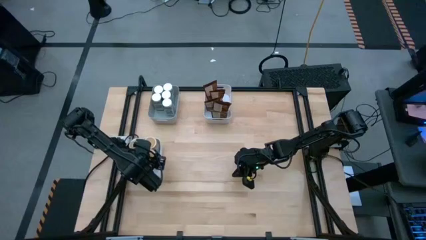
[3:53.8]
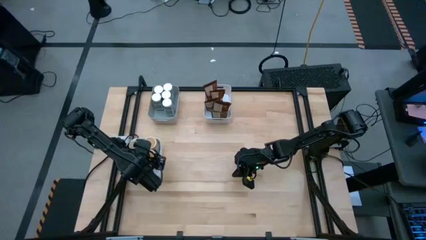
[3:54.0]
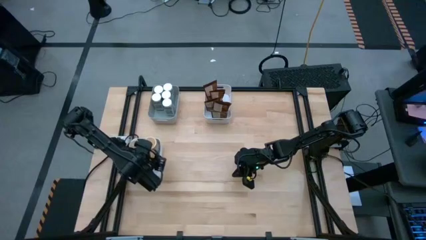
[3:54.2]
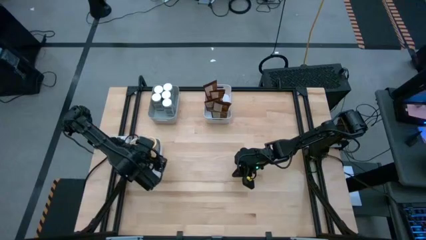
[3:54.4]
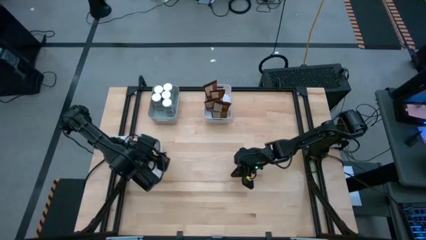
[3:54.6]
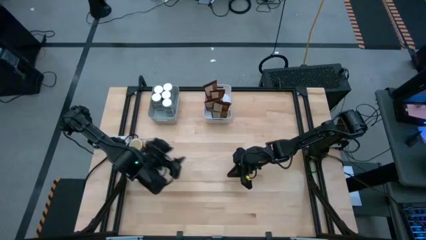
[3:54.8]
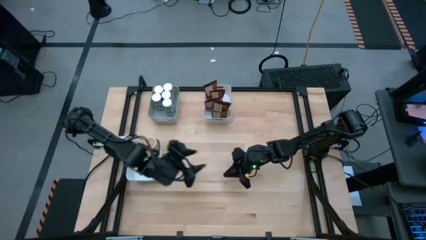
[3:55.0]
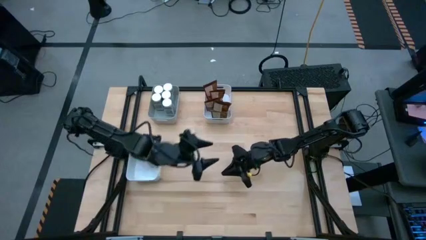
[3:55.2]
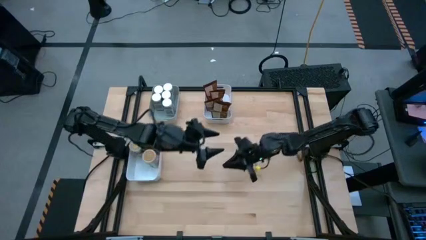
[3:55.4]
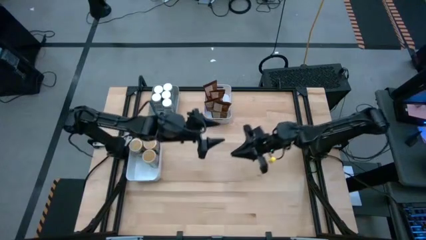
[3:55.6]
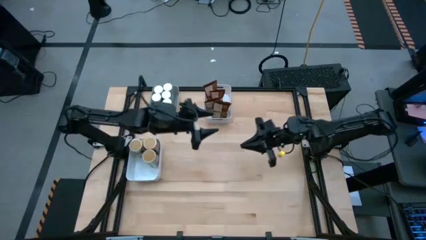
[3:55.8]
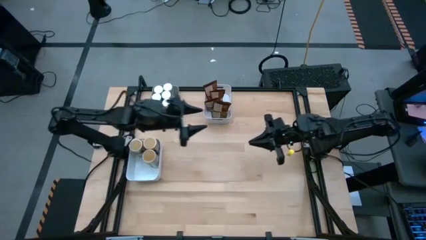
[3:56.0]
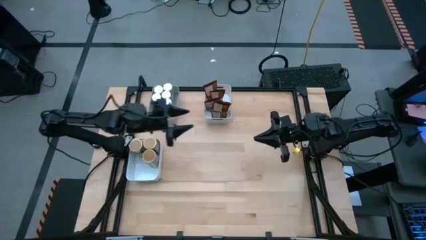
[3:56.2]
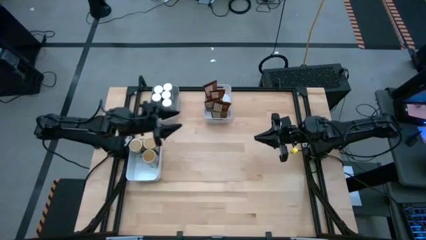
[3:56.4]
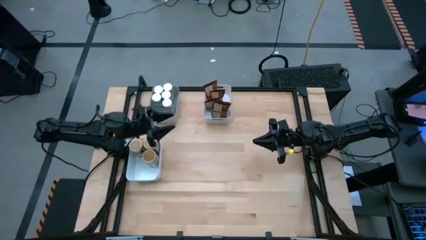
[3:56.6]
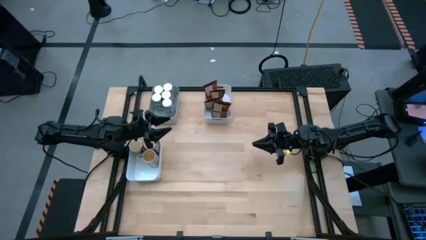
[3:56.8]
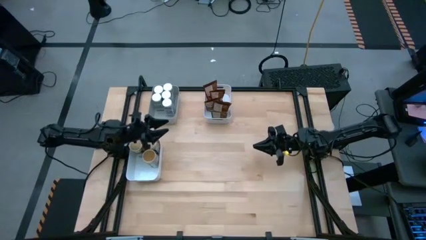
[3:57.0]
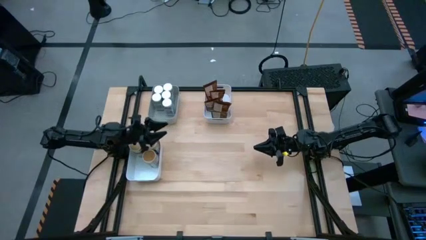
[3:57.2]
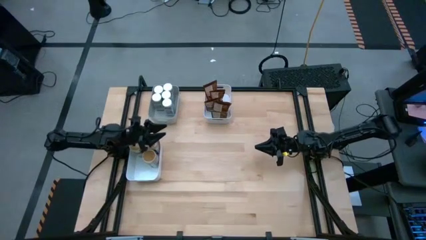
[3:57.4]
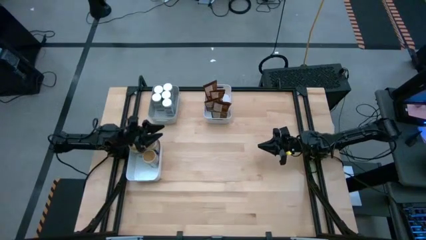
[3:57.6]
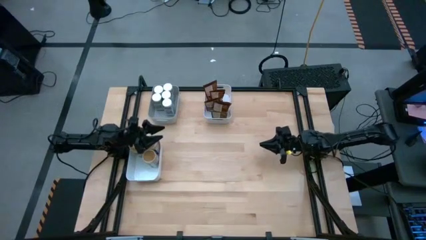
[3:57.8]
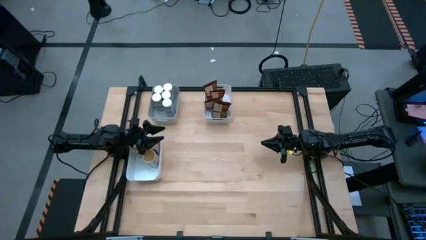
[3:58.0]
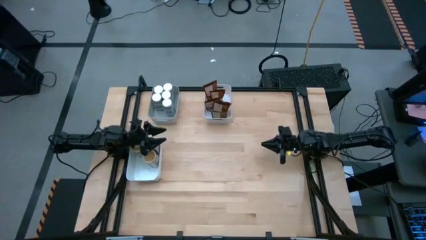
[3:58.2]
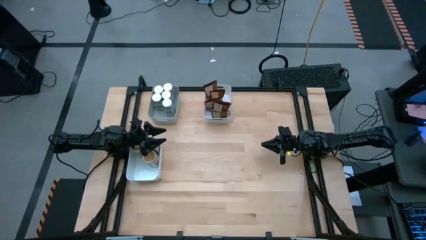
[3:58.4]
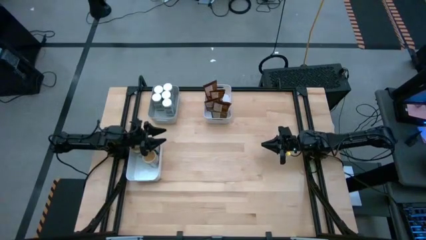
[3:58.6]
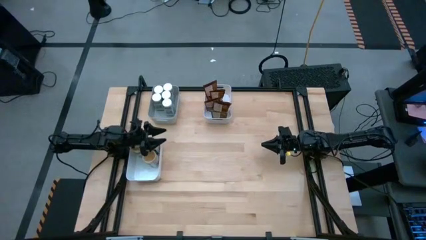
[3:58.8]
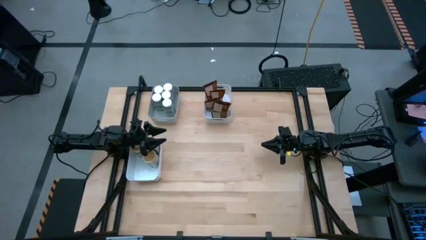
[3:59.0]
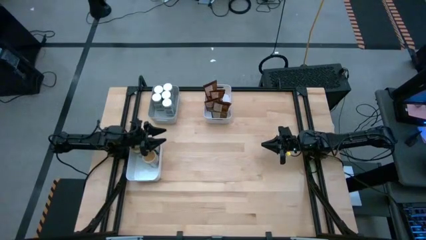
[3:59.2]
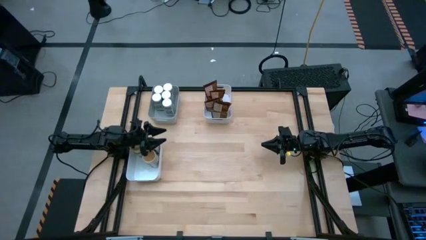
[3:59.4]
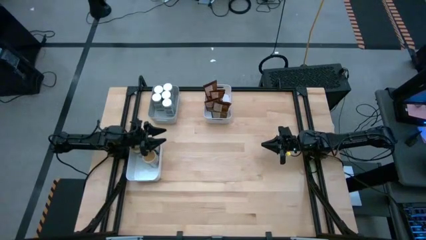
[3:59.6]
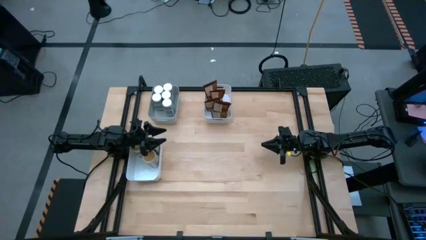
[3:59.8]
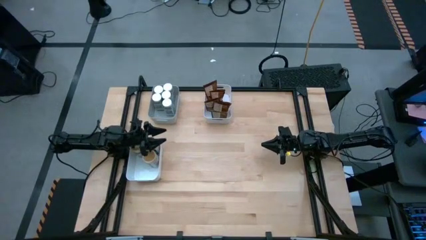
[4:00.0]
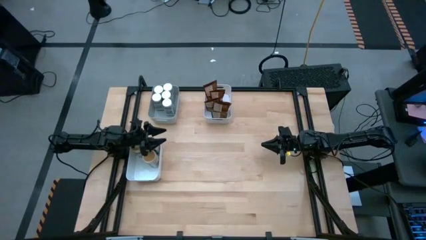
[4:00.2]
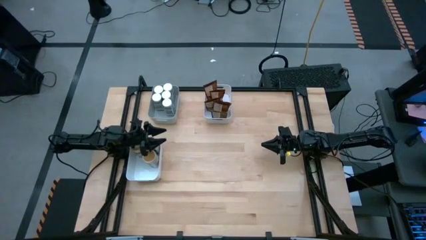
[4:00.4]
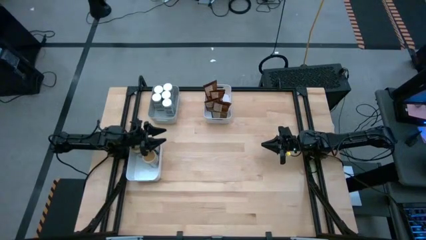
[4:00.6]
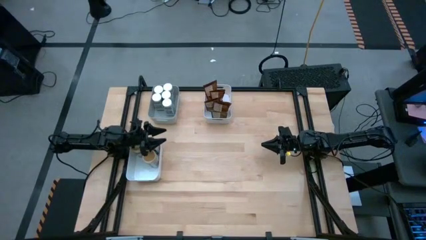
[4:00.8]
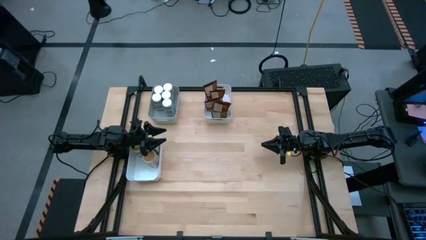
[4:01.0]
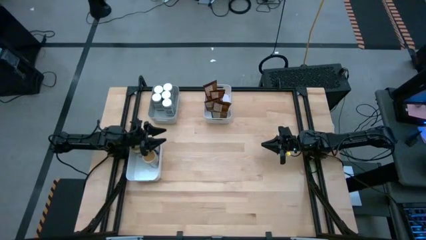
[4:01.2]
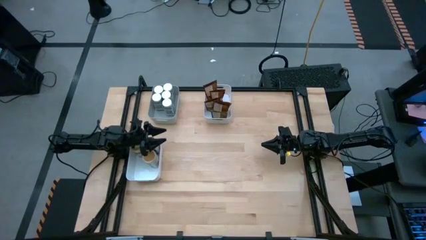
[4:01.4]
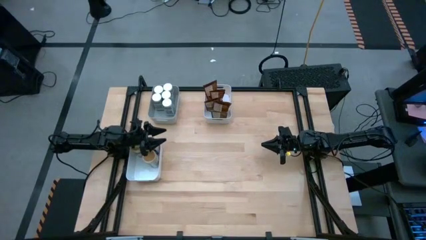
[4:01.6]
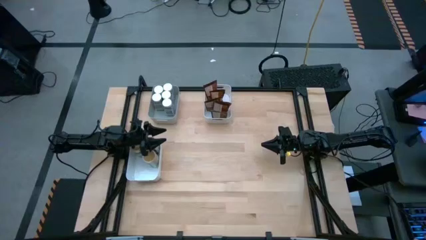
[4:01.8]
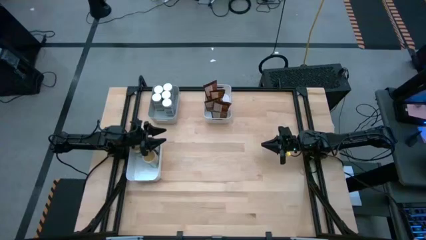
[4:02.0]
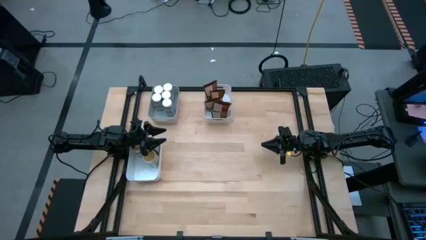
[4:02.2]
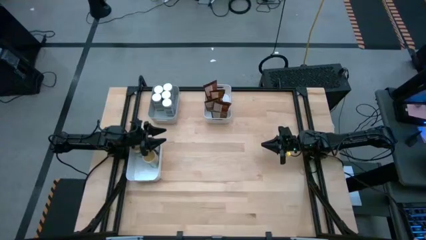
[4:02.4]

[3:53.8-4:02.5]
Task: Sort spices by type
Return to Home Position

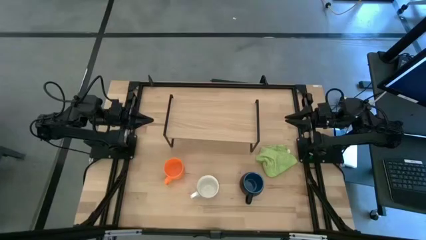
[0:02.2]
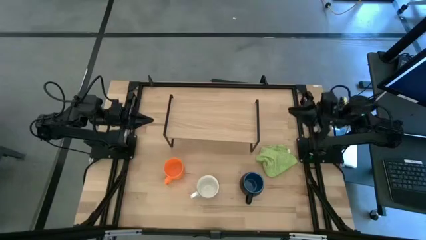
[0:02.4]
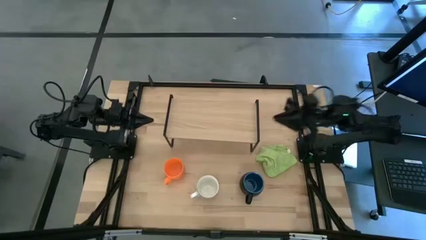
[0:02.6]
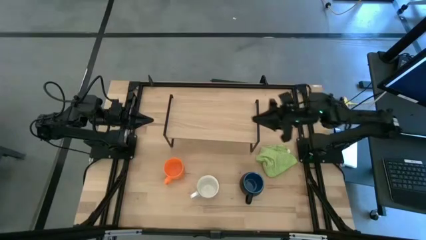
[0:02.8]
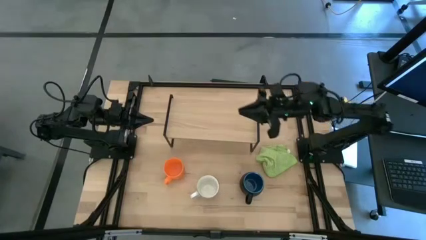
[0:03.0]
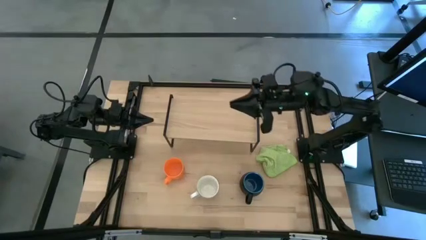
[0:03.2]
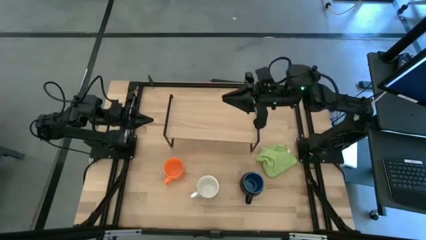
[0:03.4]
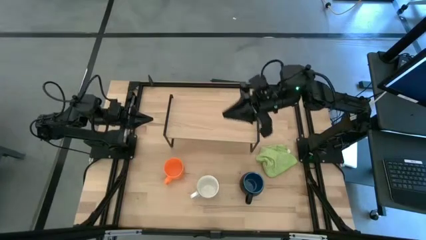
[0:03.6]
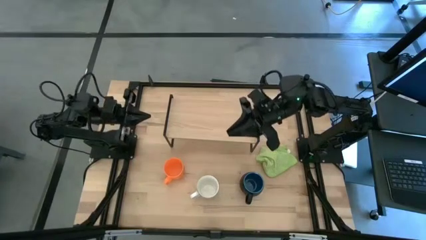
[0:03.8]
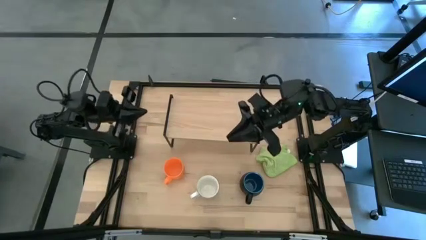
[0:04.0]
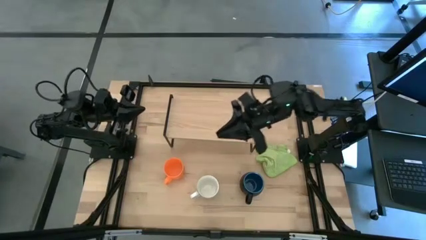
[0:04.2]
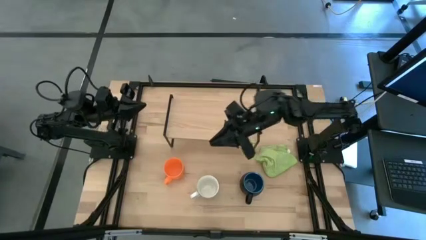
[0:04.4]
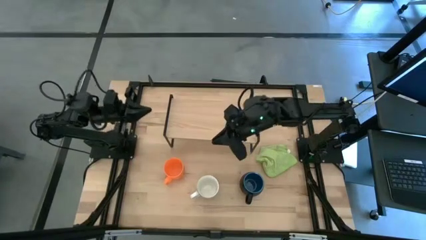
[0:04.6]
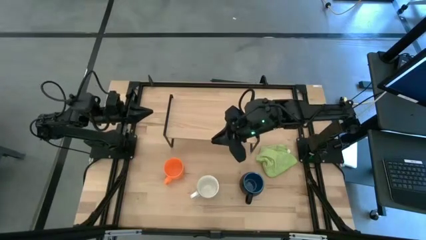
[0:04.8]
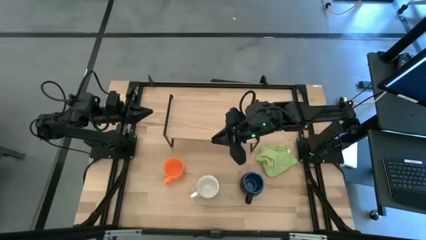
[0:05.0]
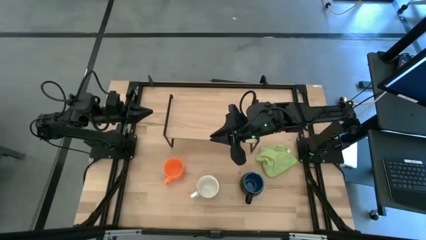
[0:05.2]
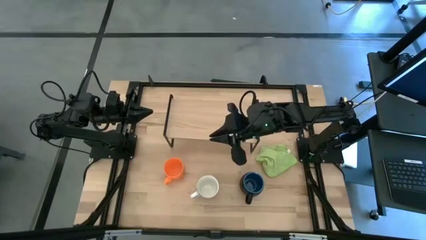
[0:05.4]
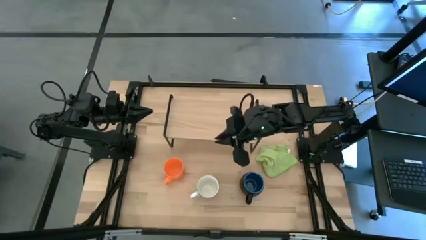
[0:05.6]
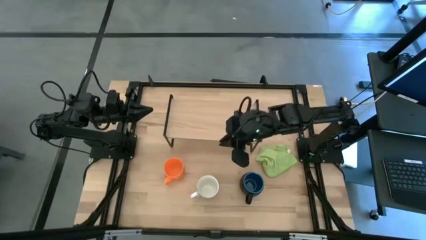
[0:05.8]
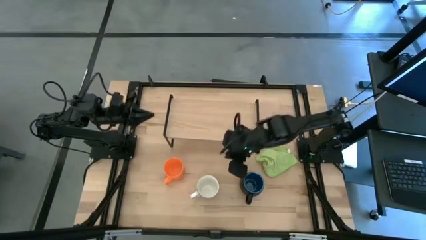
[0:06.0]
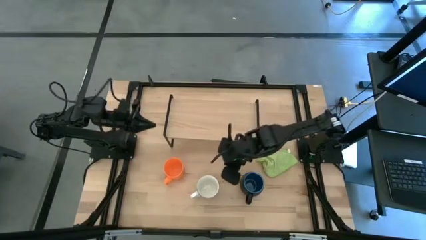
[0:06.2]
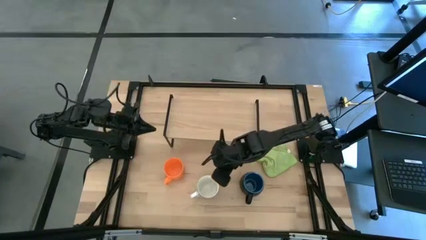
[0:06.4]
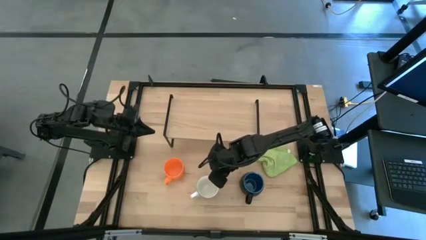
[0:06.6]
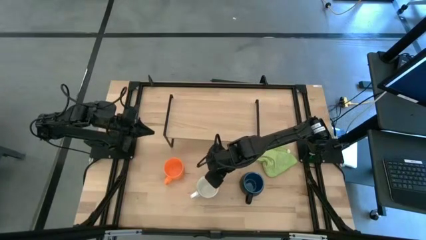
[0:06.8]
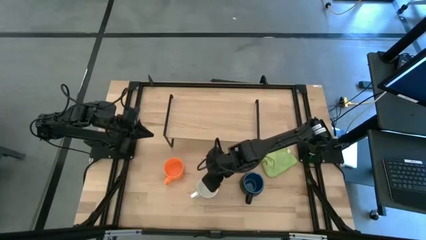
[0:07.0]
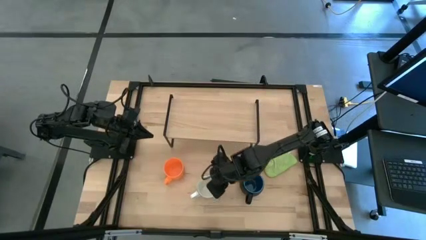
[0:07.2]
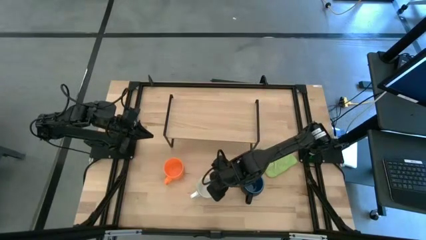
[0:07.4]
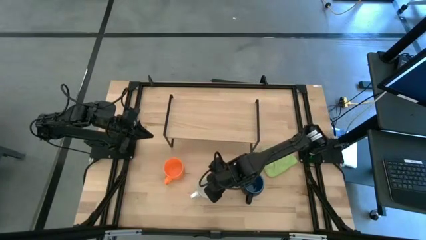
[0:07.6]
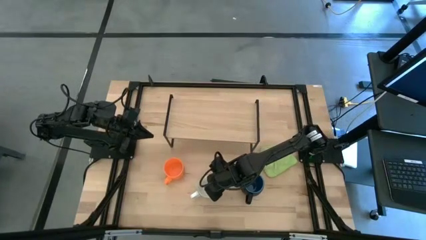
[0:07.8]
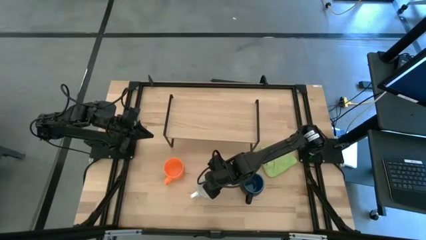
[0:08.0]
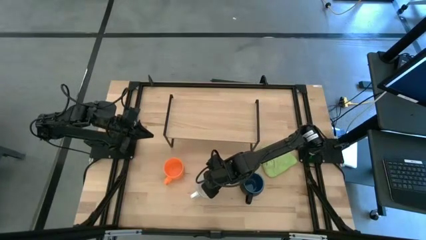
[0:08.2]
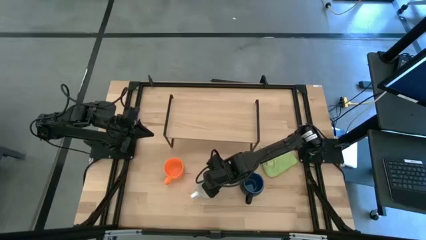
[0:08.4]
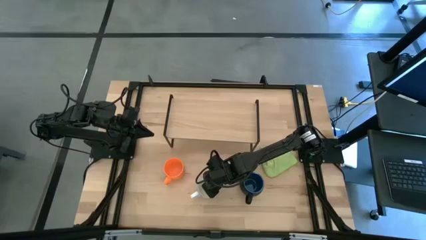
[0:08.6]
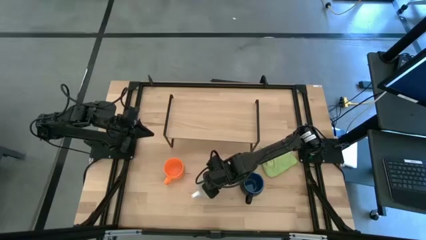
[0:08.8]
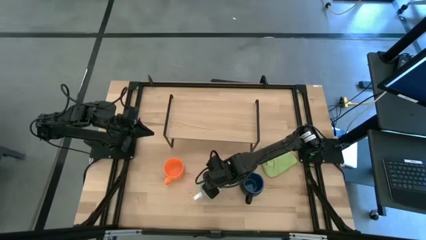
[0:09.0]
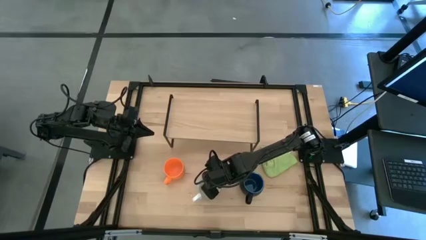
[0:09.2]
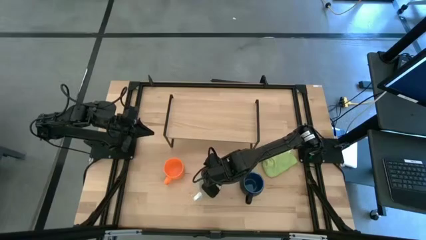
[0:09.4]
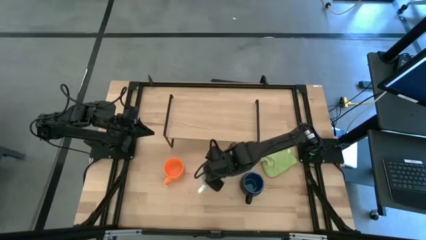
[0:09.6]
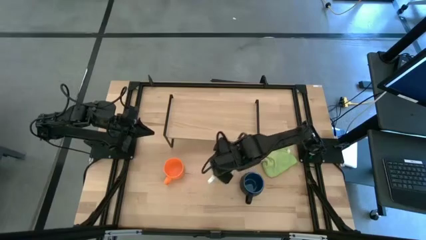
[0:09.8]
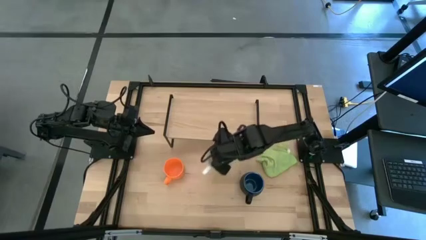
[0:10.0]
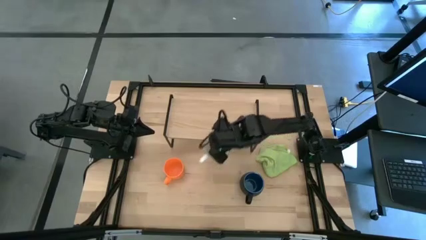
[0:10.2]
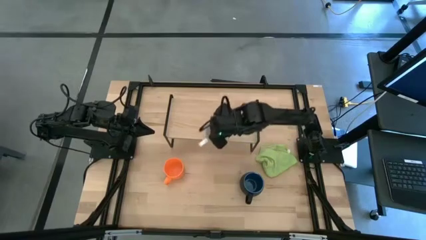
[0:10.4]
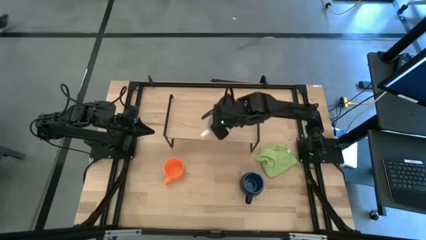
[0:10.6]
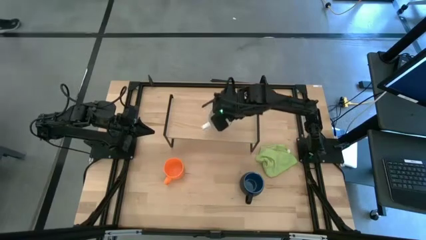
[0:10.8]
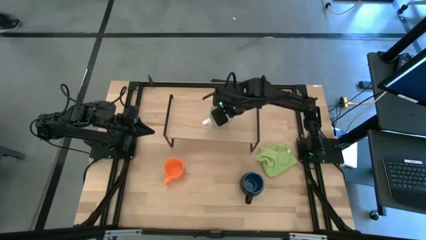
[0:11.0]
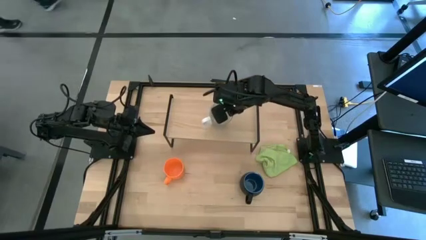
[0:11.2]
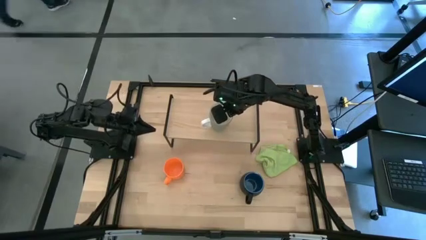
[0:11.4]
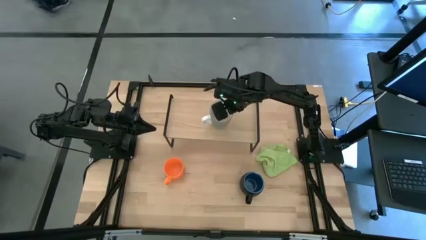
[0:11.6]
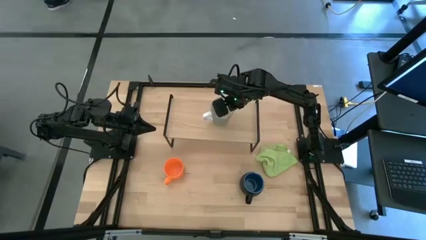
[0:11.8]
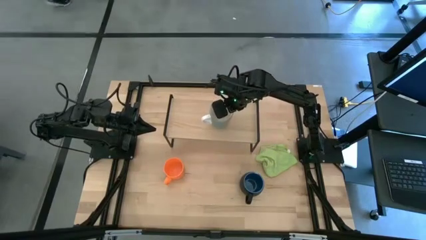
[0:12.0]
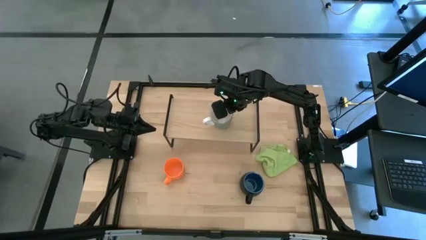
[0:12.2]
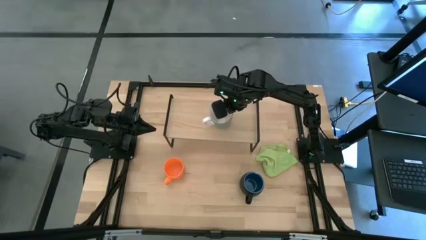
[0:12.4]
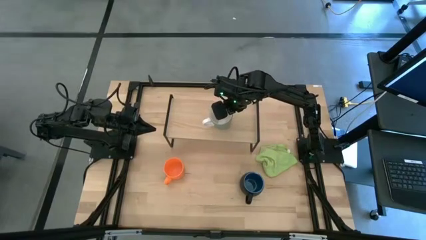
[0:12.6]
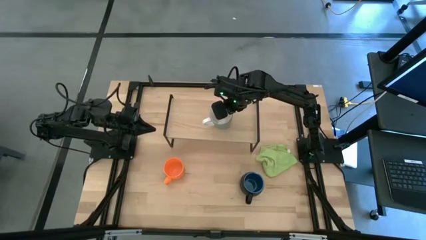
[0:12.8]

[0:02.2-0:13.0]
Task: Stack small to large cups/mugs on shelf
Put the blue and white mug on the shelf
